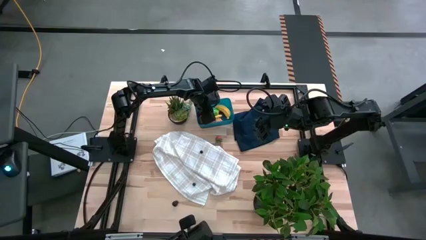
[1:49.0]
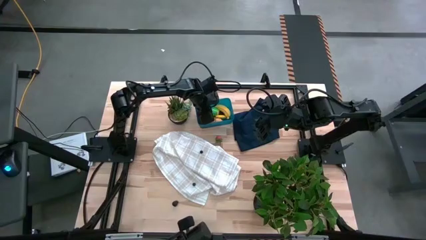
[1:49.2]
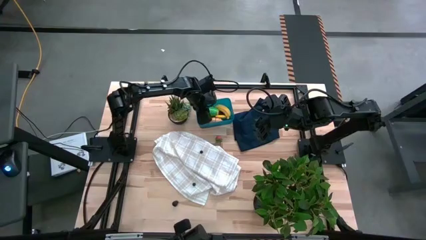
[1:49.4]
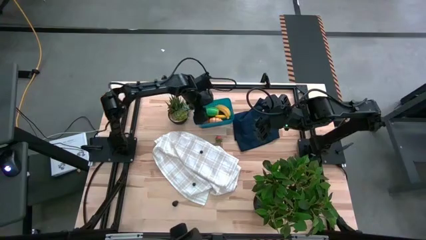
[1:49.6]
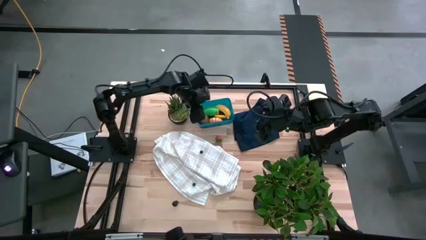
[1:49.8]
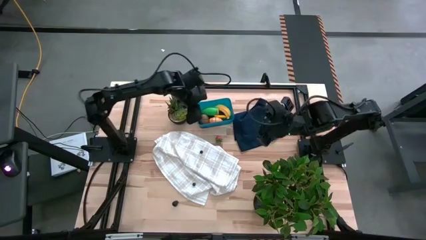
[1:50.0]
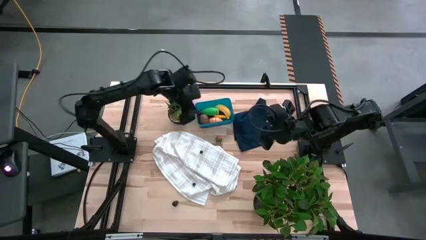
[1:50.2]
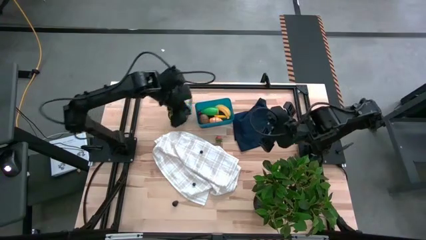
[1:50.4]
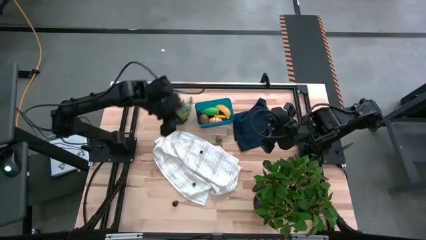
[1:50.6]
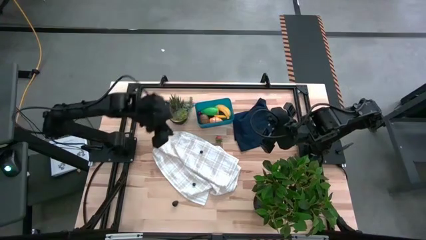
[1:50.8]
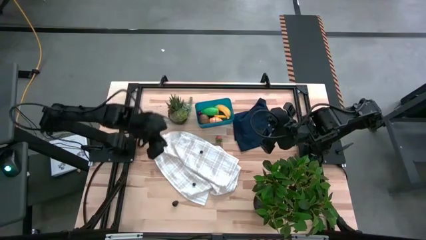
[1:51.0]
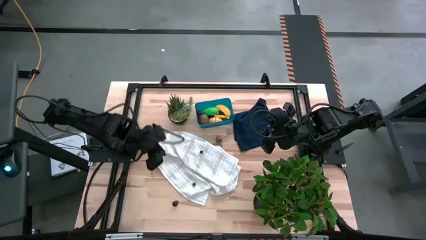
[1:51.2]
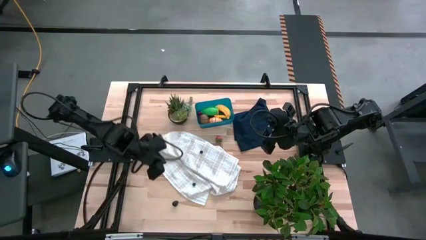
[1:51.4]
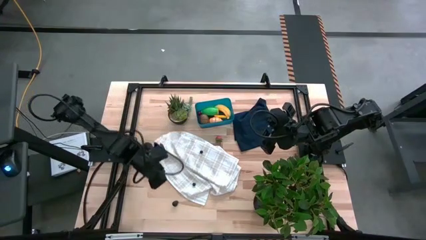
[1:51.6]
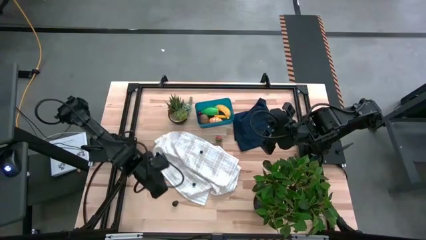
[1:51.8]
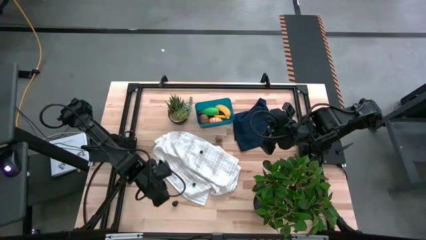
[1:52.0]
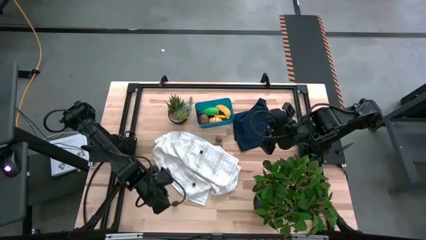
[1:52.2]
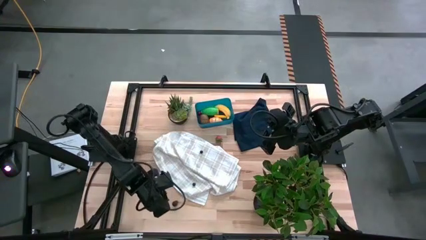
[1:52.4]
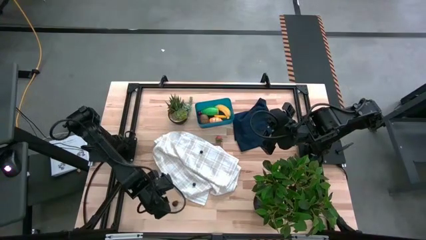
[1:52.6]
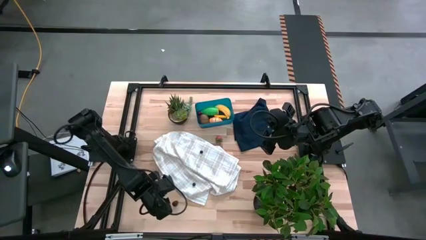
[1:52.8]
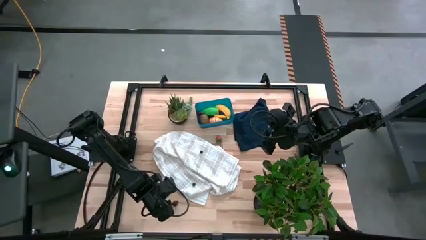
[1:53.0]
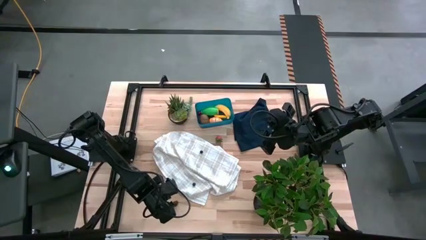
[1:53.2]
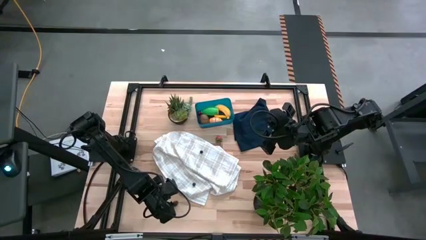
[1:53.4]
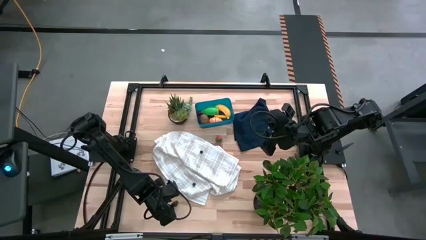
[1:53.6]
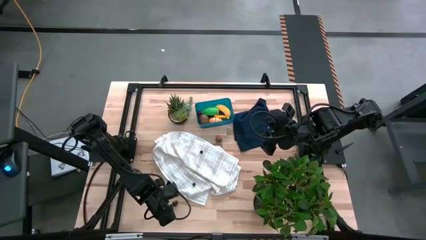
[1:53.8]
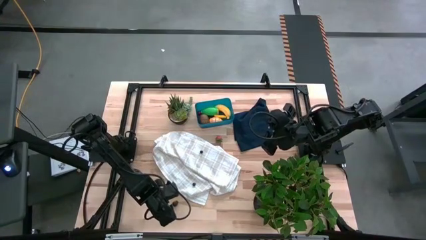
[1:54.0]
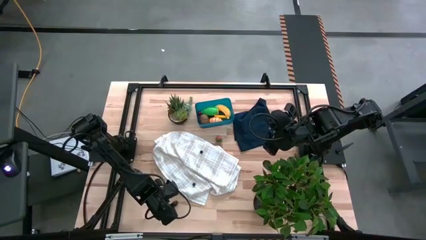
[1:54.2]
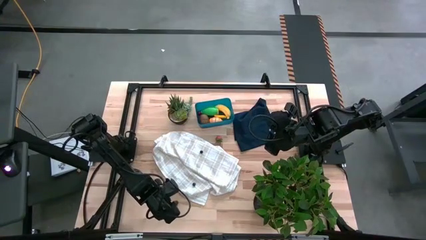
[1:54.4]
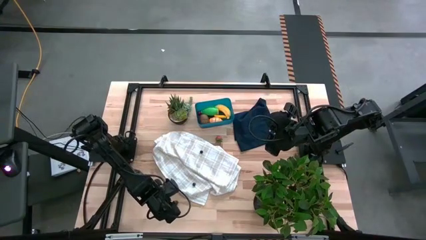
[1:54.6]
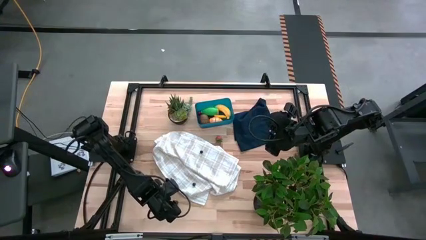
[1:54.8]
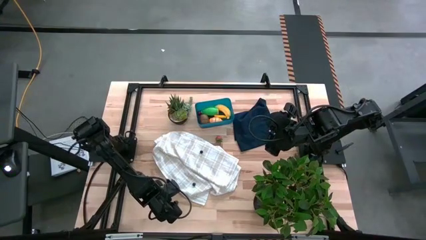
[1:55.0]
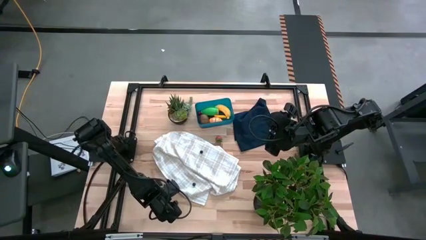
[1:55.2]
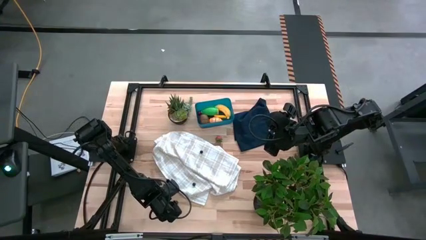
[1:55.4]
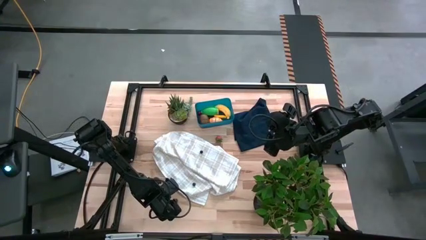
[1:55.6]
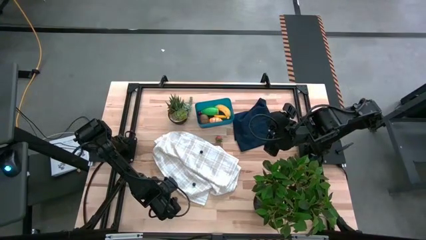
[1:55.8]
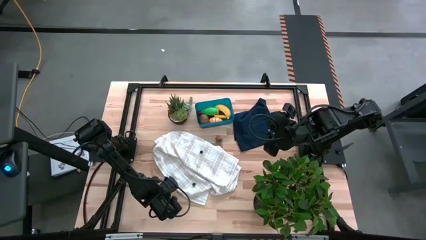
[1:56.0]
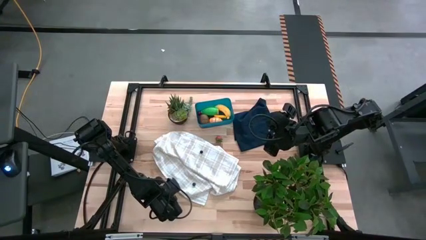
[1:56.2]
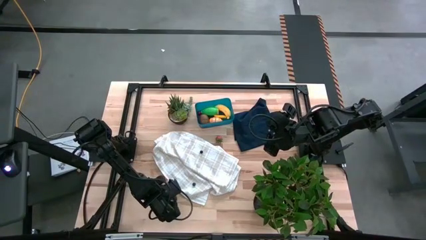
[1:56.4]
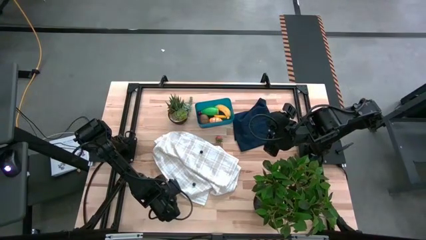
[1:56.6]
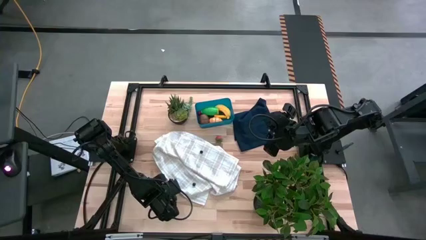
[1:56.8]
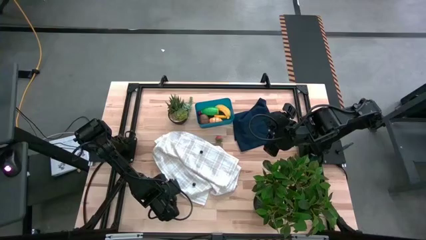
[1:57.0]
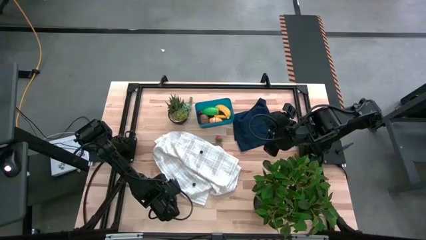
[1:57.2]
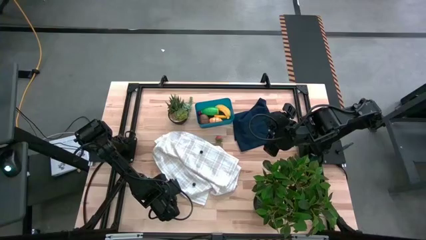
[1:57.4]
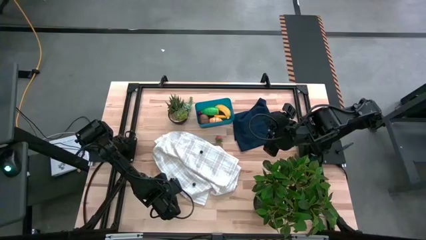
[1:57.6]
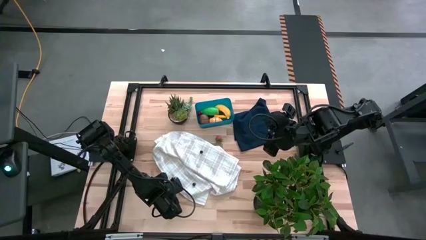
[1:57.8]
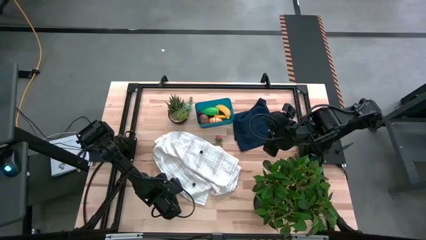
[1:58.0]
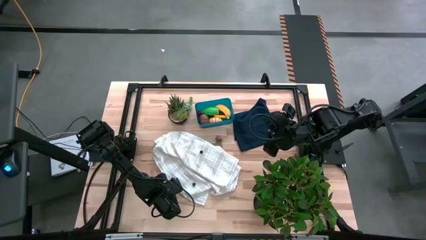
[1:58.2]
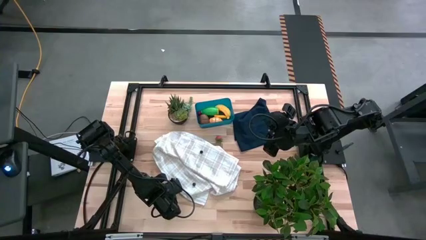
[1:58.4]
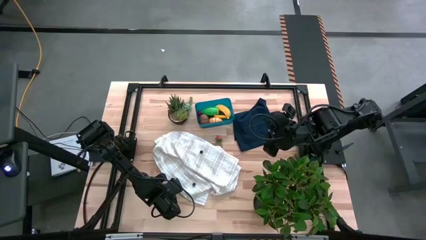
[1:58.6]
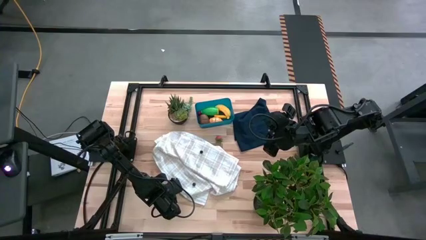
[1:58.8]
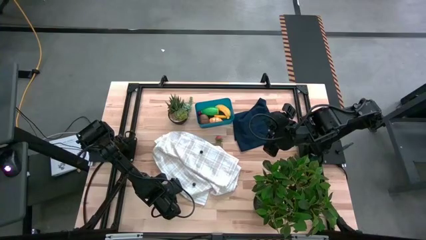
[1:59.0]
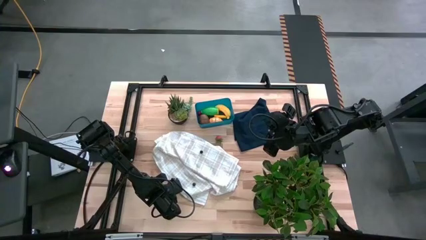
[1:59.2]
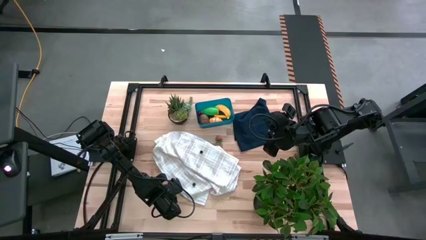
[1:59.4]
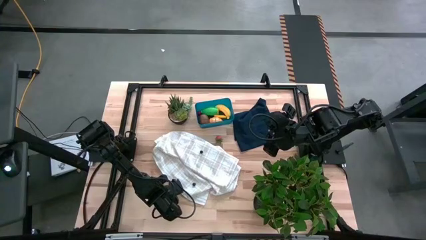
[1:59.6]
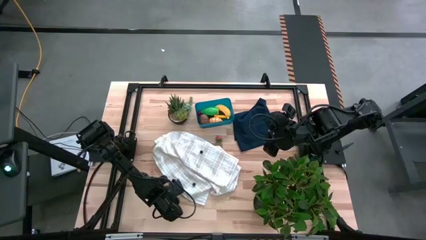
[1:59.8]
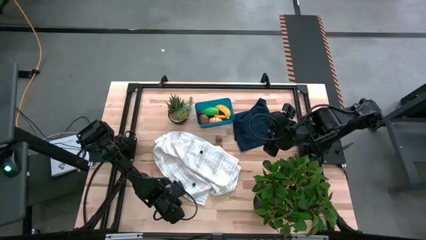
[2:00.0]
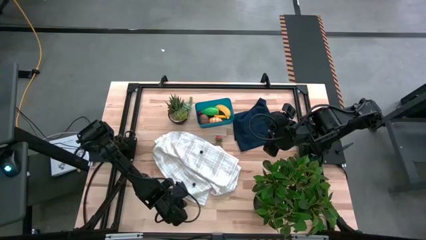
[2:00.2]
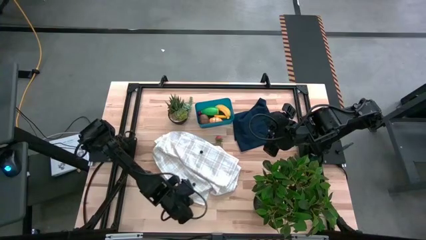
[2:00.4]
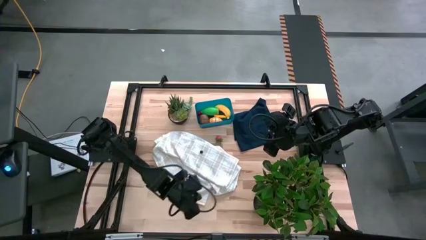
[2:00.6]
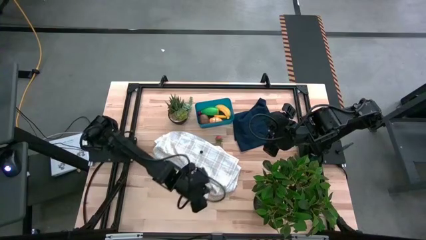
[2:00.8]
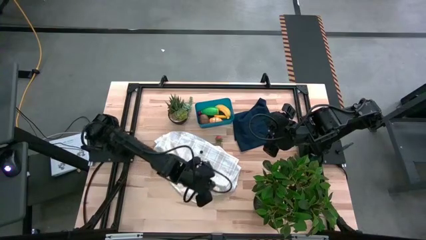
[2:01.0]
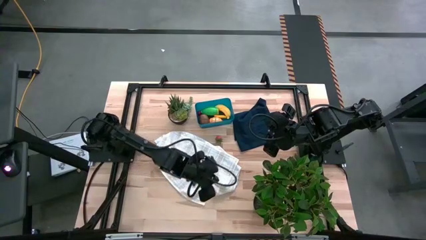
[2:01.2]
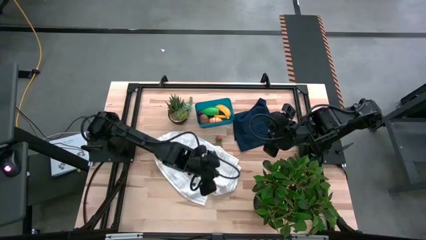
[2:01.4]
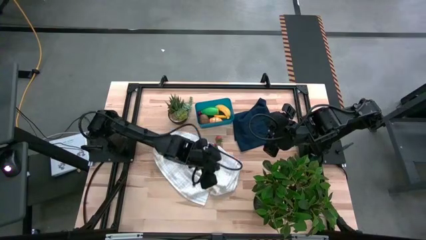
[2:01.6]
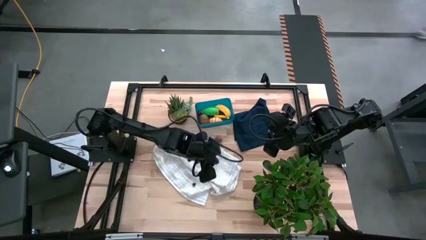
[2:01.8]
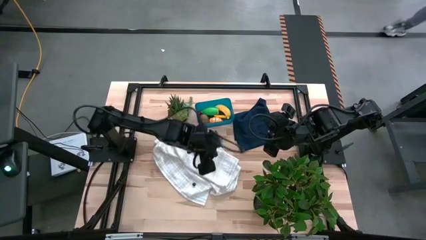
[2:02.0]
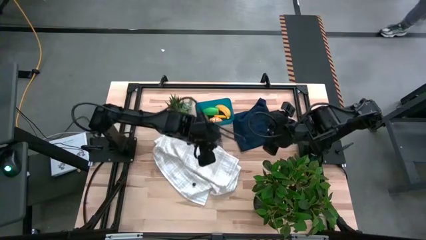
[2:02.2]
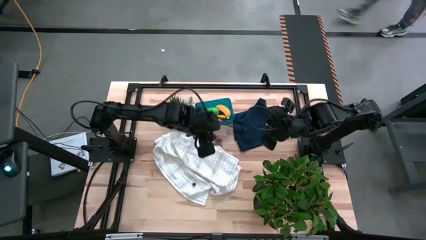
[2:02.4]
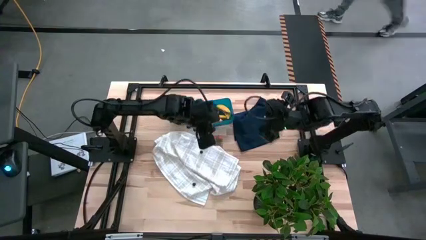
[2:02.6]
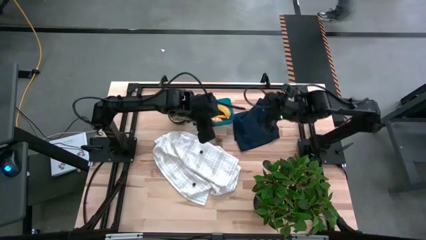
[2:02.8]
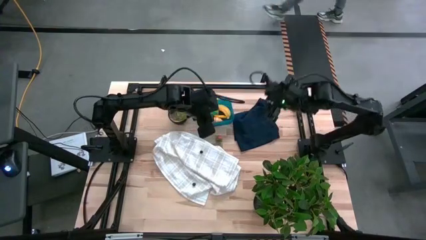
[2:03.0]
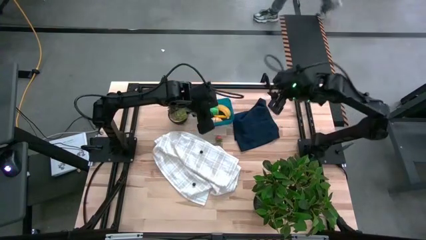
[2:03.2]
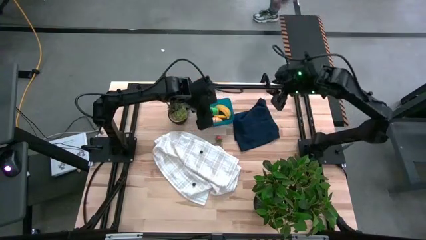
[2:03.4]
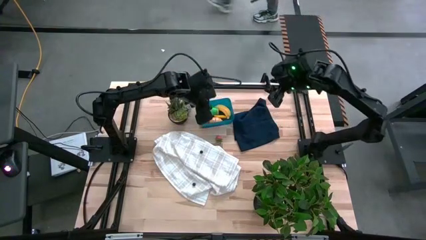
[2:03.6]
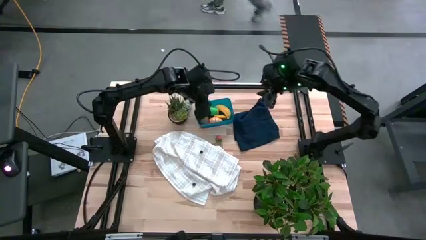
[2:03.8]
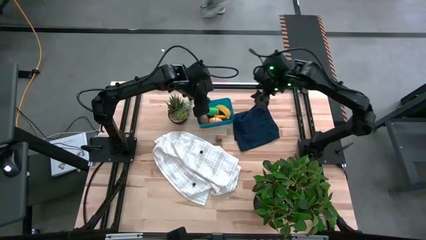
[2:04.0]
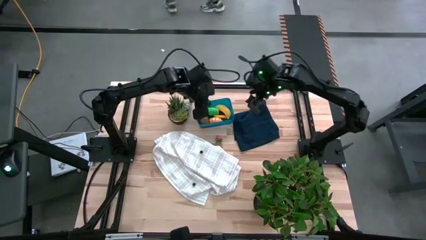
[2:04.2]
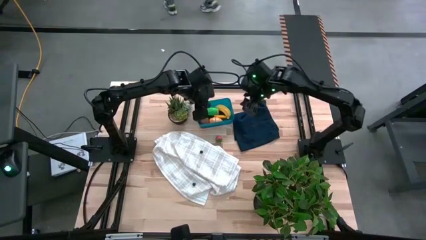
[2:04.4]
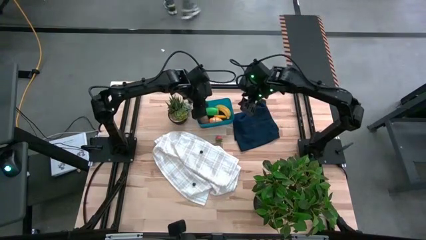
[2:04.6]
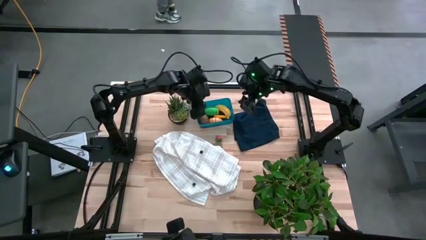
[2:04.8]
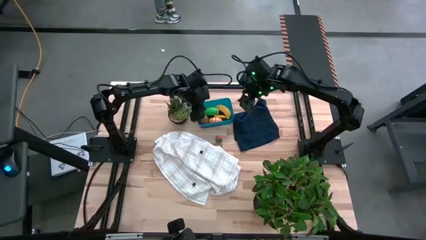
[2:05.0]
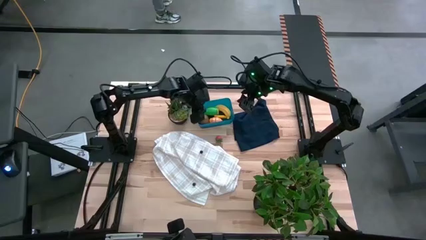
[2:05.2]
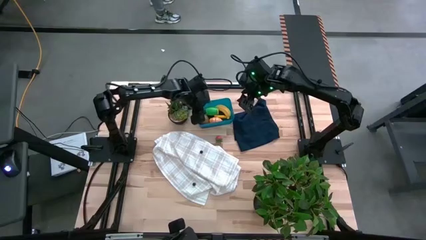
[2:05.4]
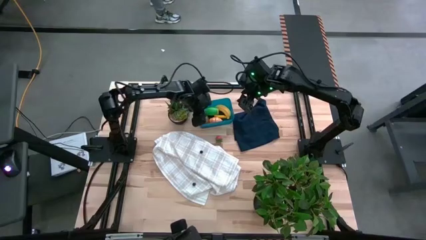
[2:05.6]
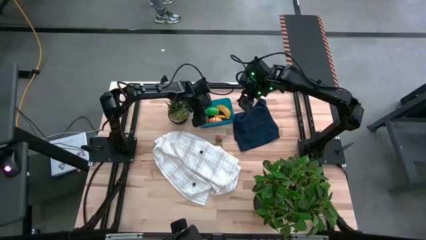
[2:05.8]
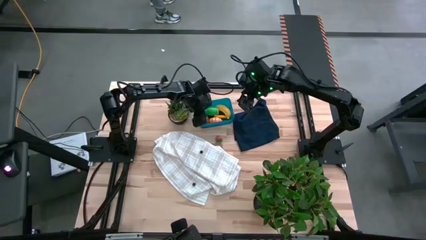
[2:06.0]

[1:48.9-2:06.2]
Task: Pick and placing Produce into tupperware
Put the blackberry into the blue bin
